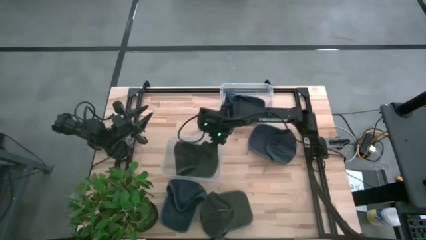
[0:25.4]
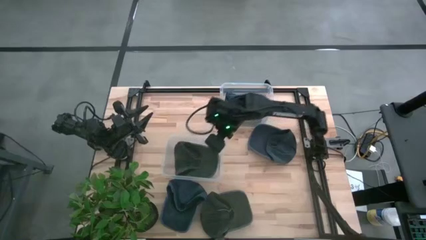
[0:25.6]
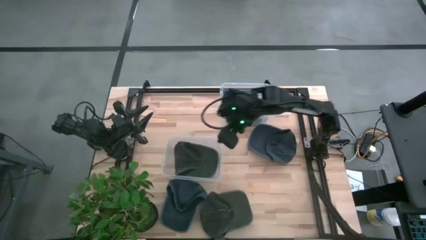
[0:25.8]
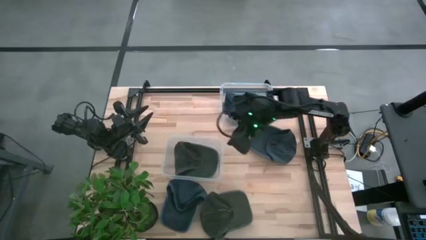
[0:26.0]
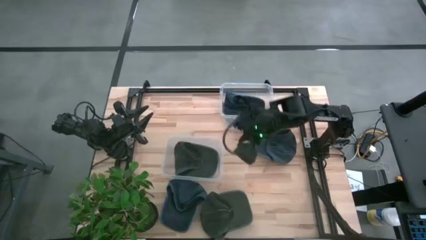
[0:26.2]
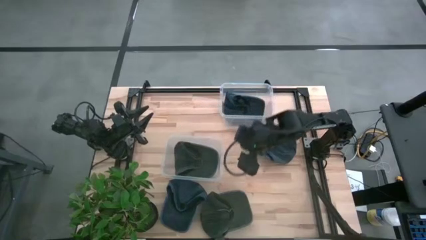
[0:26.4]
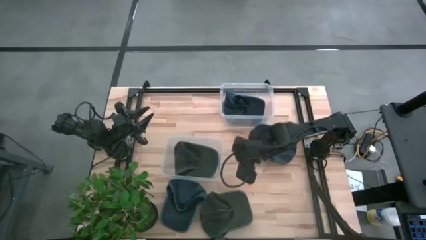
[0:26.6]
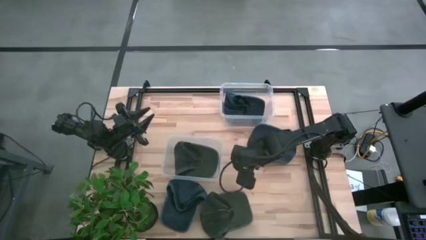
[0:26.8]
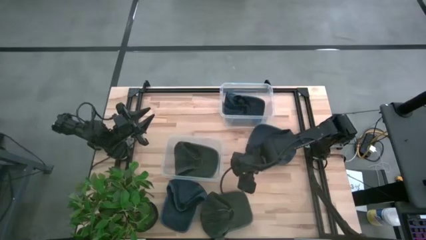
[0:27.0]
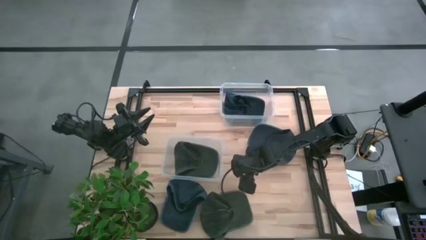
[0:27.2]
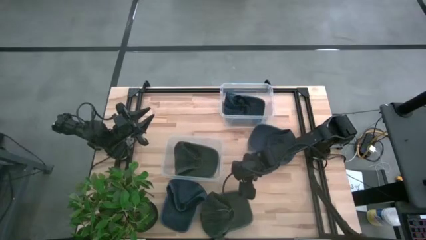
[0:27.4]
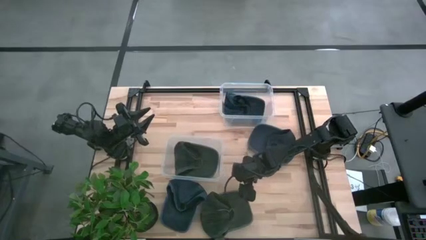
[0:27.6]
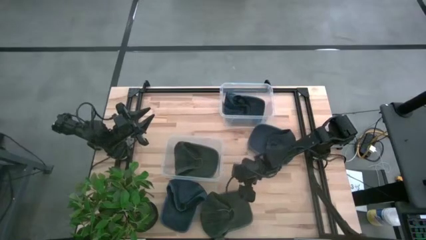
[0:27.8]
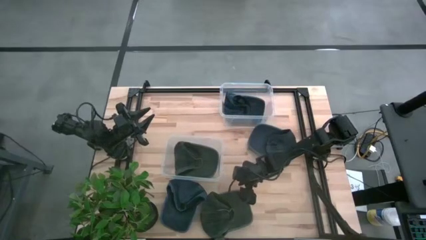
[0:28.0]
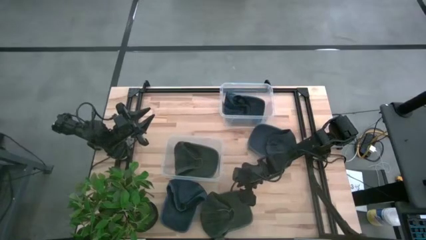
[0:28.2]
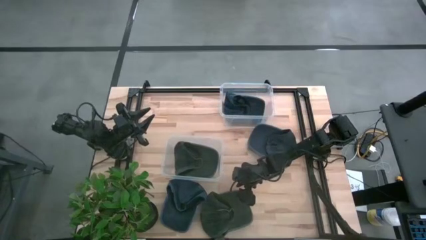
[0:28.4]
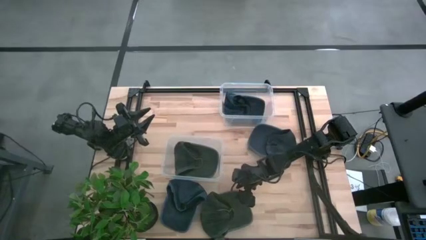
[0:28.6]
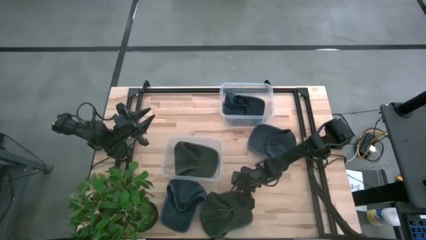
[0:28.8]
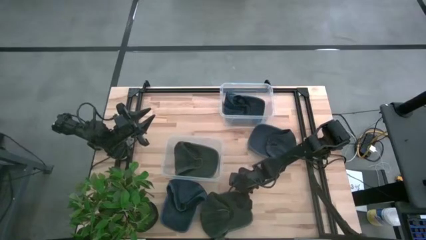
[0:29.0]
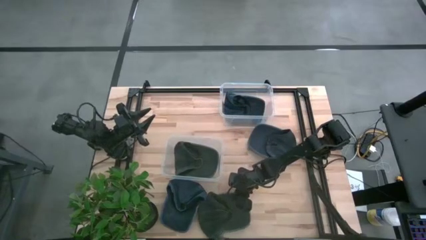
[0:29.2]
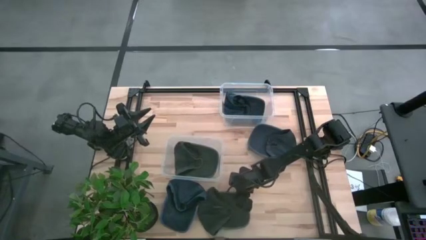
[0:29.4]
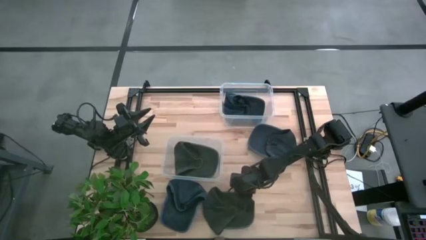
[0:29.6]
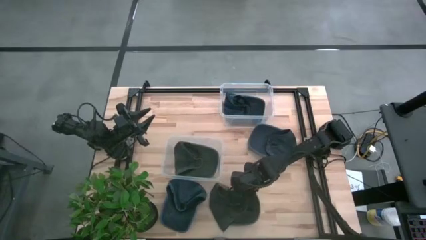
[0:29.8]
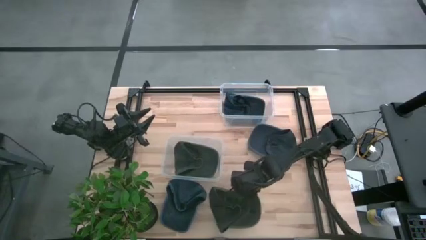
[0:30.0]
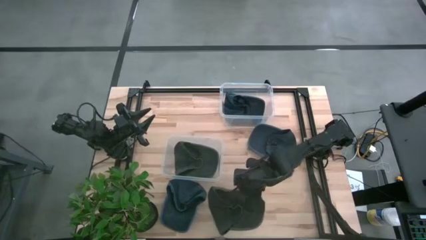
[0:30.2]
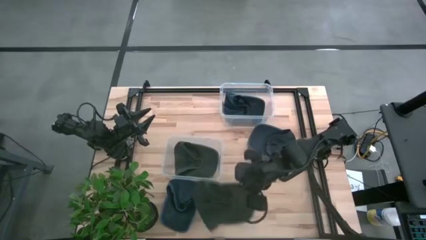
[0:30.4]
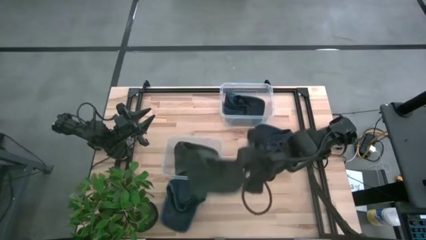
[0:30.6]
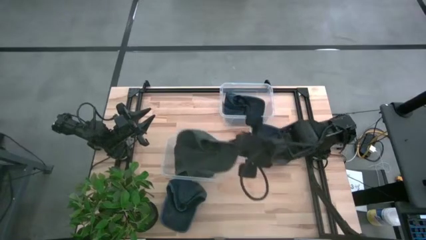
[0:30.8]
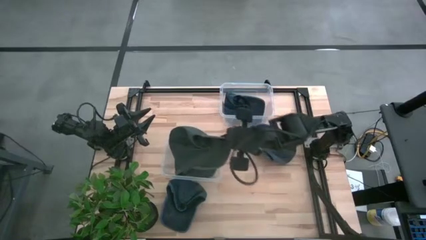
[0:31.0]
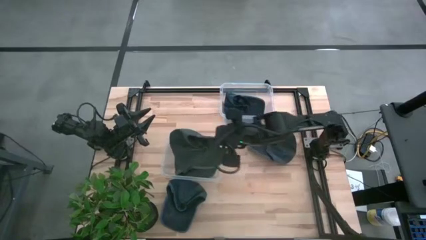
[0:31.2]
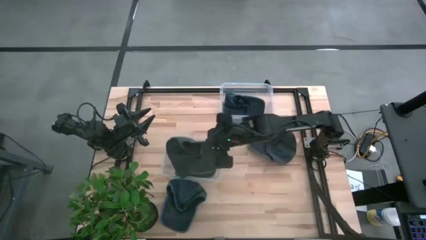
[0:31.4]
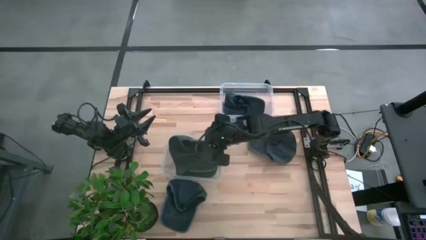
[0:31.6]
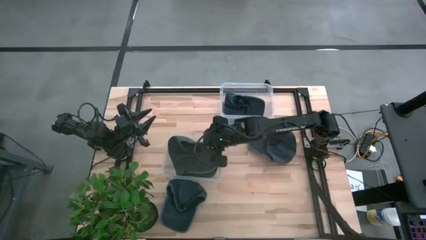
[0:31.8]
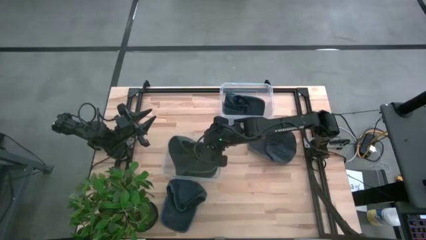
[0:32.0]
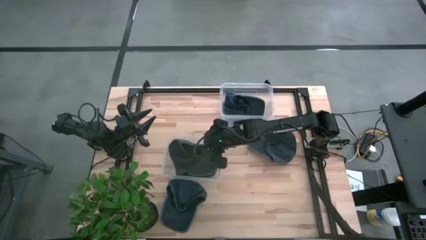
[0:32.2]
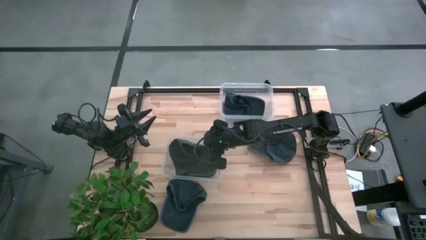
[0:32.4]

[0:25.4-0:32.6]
Task: Pick & Place hat
Put the gray cap into the bottom transparent bin

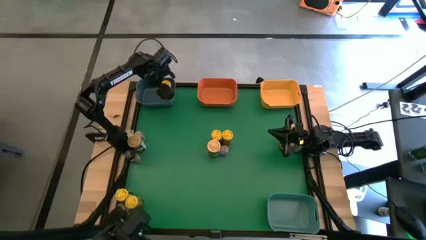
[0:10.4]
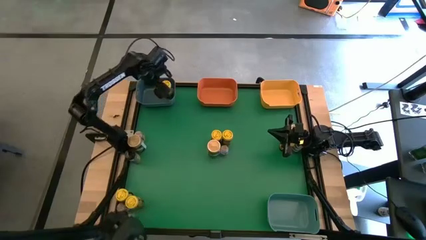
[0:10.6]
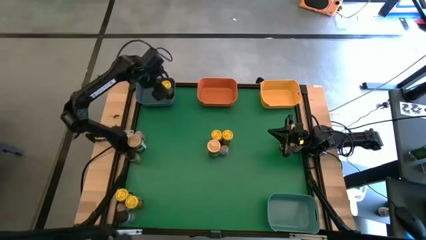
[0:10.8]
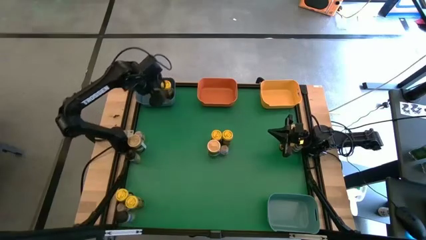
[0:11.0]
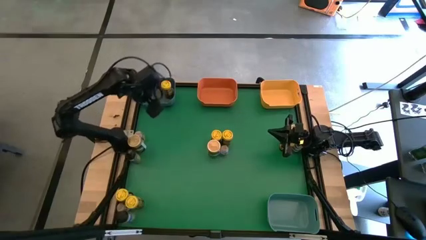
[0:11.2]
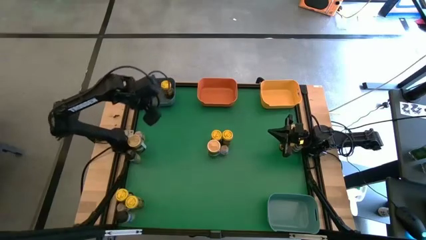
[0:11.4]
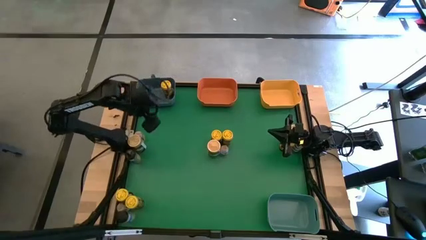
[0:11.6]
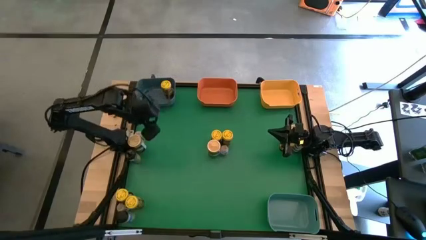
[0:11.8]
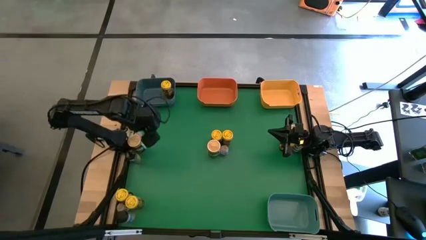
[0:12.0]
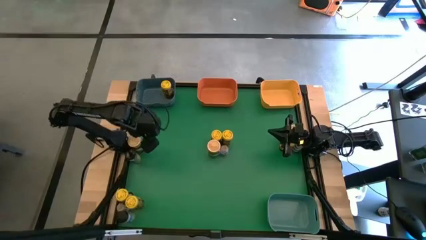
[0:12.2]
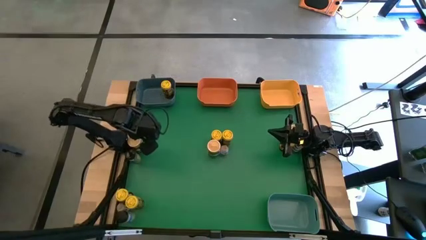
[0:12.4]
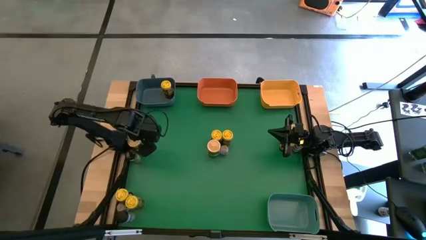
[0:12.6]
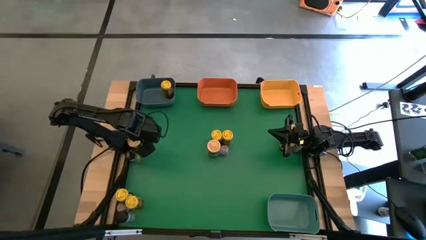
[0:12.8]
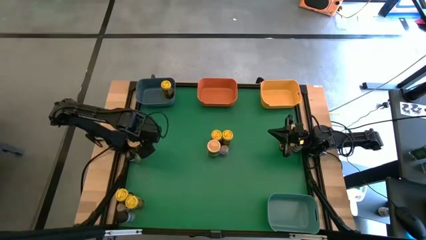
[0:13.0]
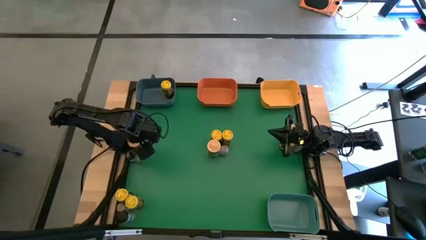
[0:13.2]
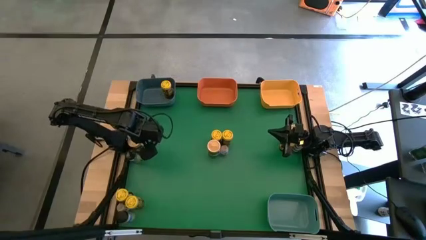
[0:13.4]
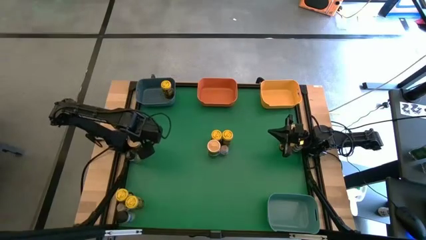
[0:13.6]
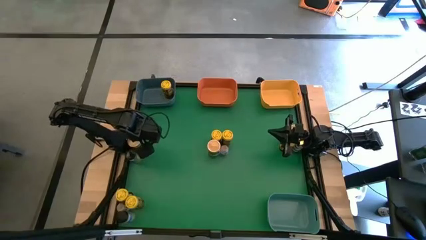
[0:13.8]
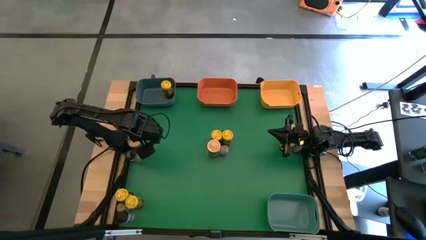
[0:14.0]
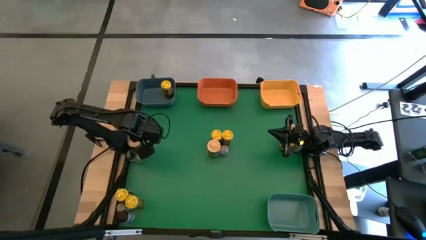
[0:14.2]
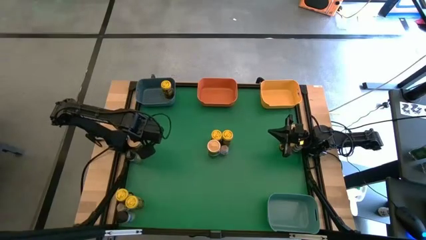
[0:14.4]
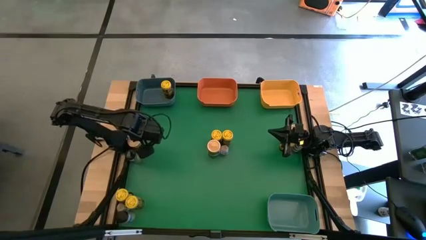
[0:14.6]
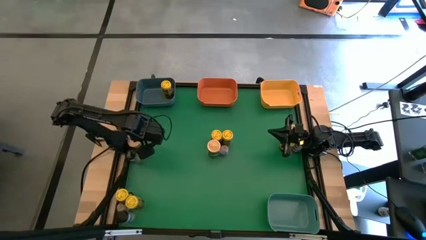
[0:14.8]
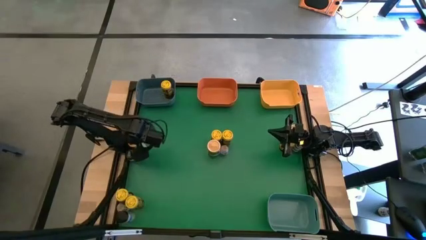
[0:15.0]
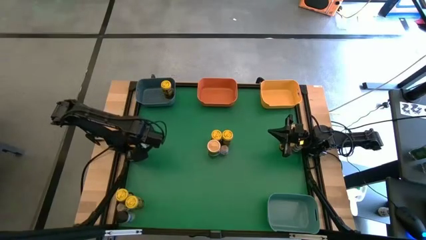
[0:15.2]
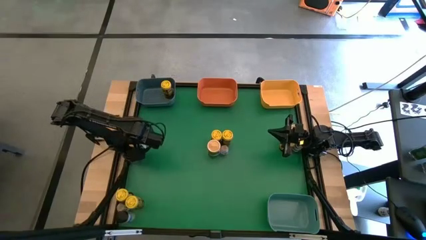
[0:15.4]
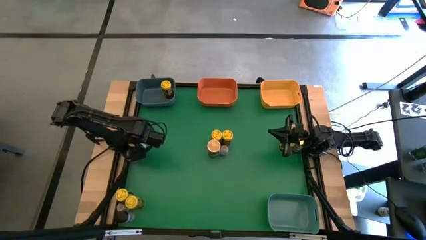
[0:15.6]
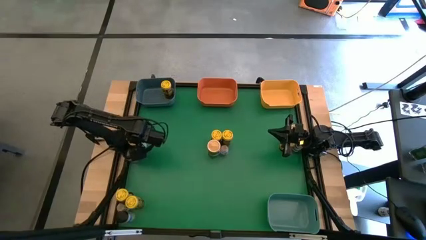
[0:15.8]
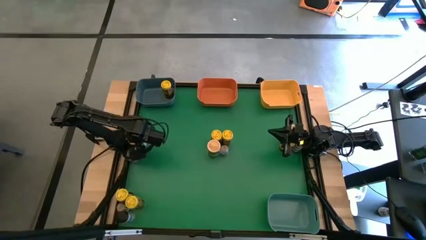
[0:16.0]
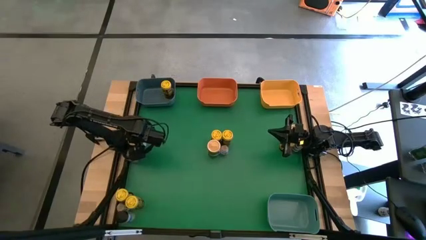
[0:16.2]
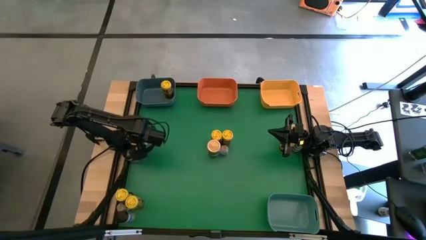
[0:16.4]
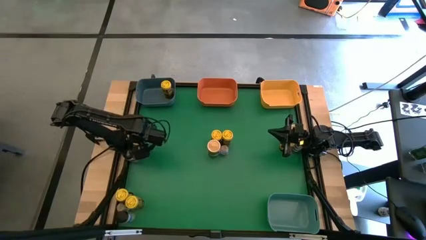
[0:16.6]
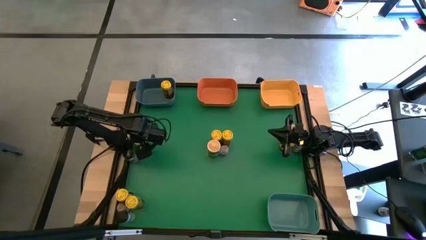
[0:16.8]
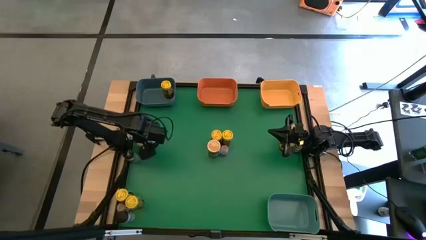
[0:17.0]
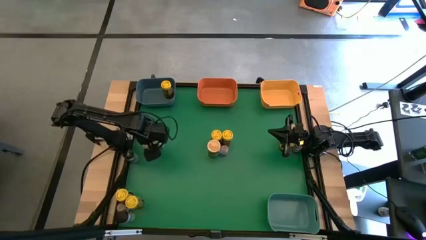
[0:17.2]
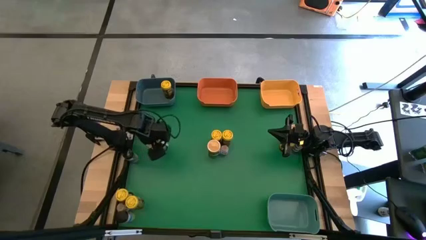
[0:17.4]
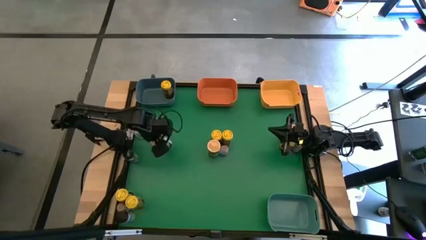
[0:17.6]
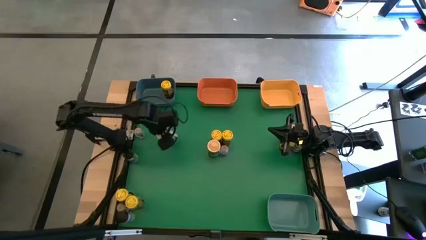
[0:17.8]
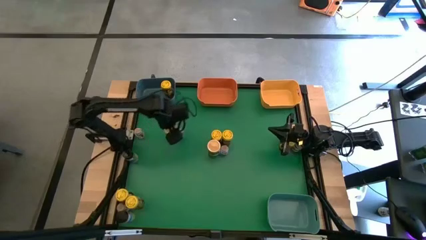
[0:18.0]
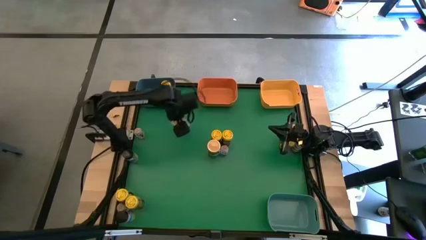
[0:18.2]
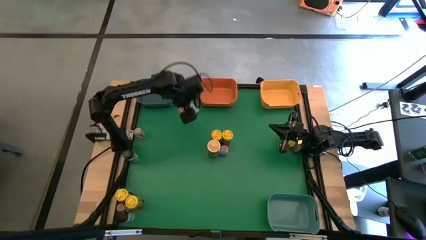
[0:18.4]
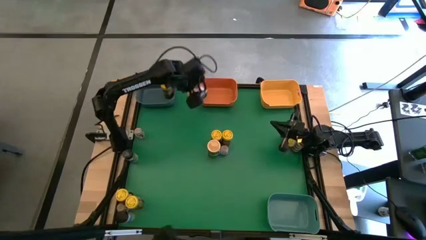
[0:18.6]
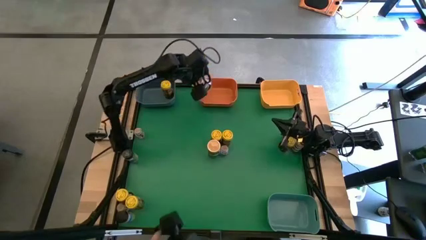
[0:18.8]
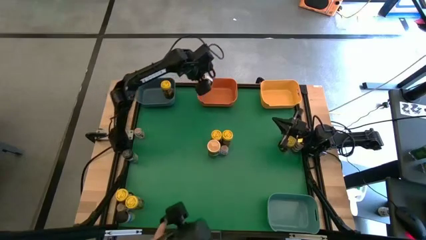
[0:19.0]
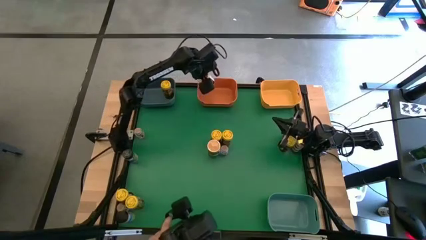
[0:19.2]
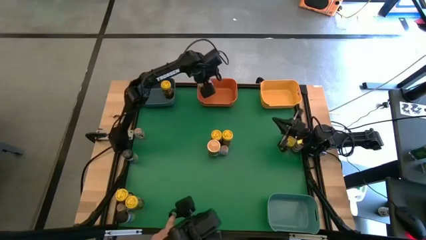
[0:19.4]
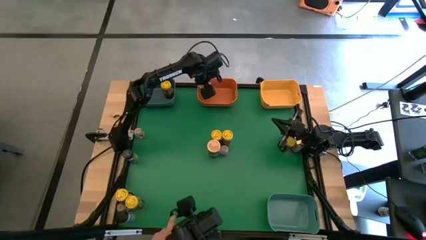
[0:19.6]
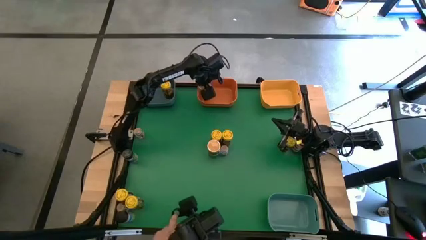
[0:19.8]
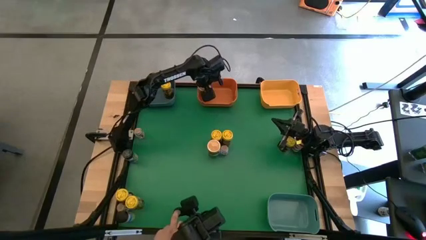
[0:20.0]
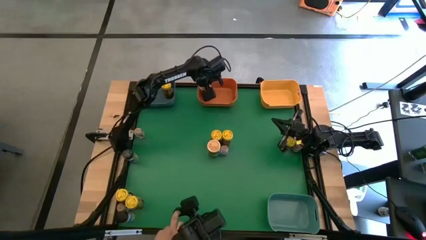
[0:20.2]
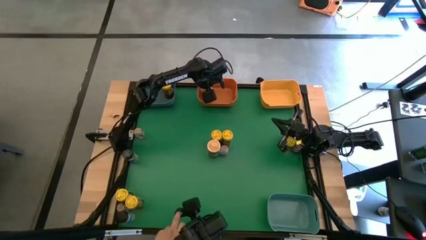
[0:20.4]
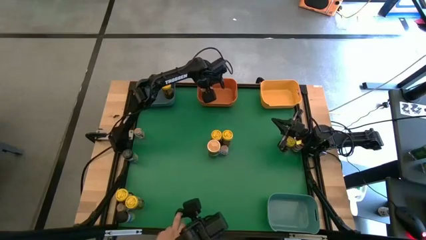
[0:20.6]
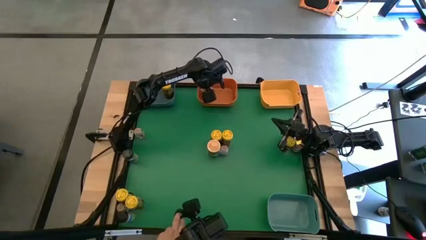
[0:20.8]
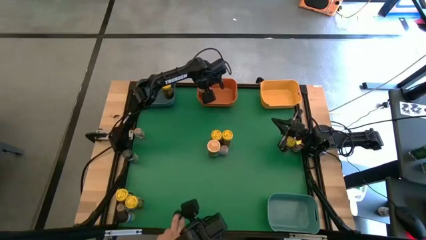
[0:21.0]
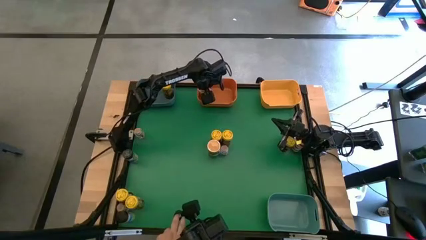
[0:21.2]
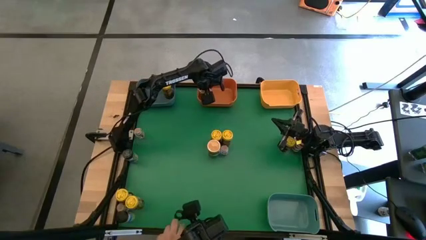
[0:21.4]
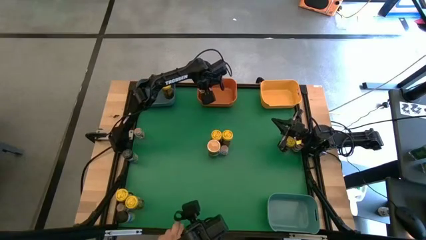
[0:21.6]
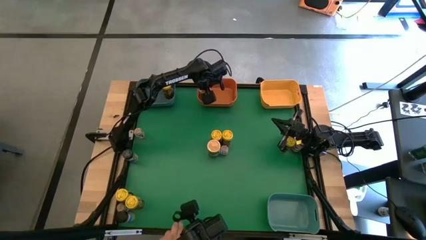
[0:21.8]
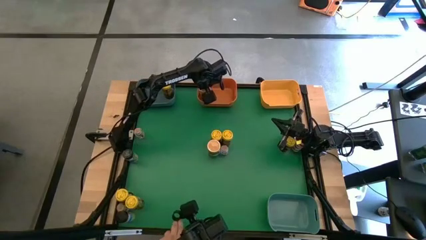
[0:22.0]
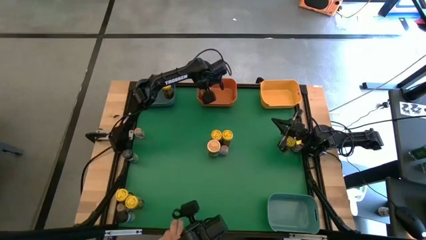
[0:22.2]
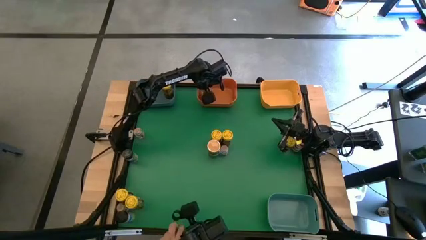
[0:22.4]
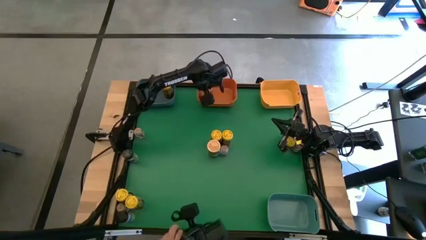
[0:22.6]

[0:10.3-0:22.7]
Task: Sort spices by type
Put the gold seasoning bottle into the orange bin
